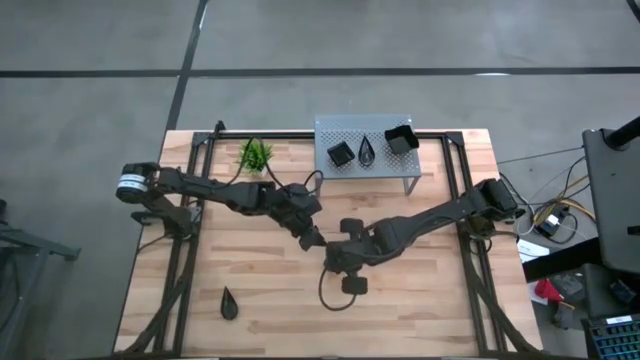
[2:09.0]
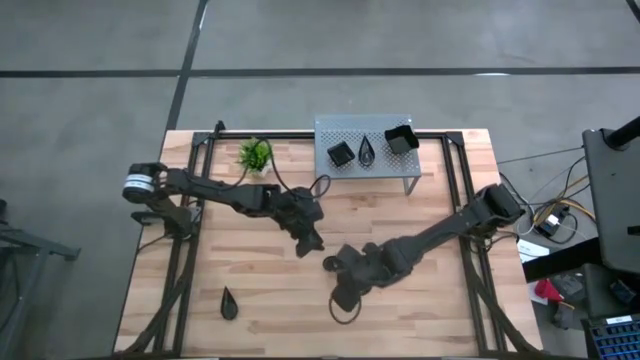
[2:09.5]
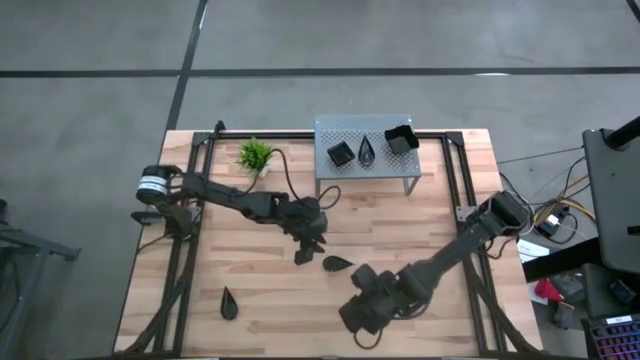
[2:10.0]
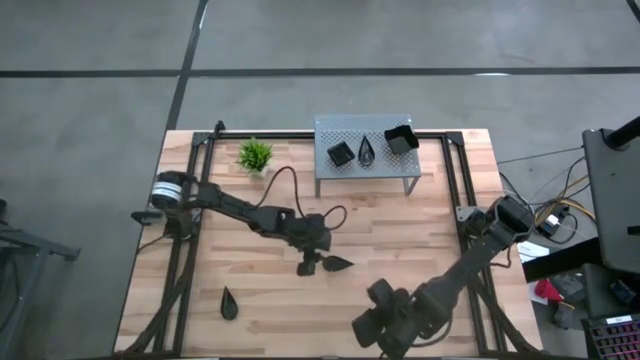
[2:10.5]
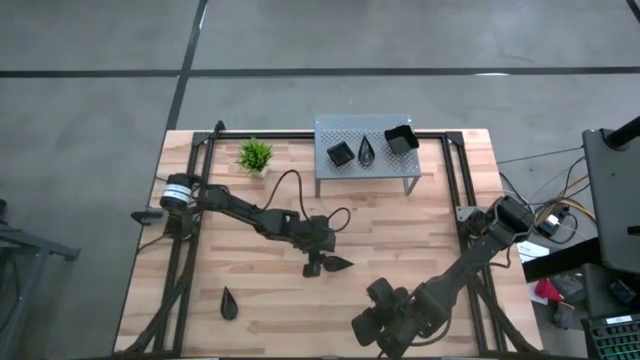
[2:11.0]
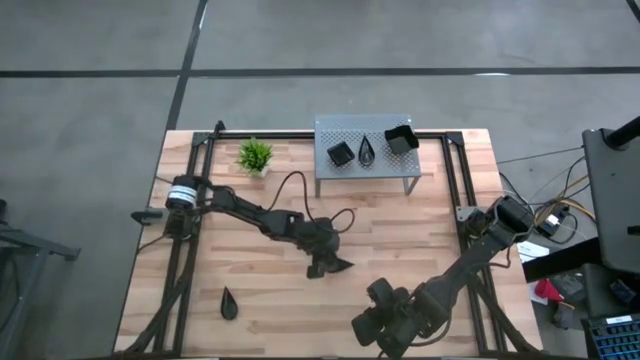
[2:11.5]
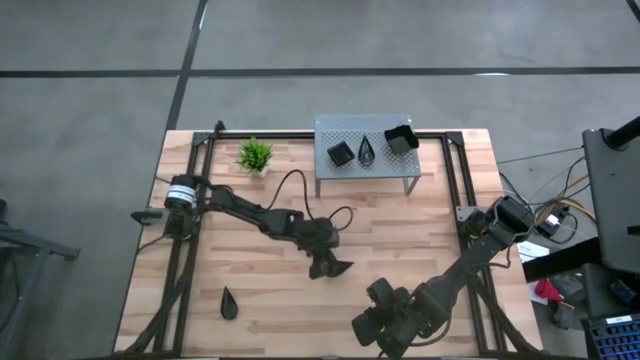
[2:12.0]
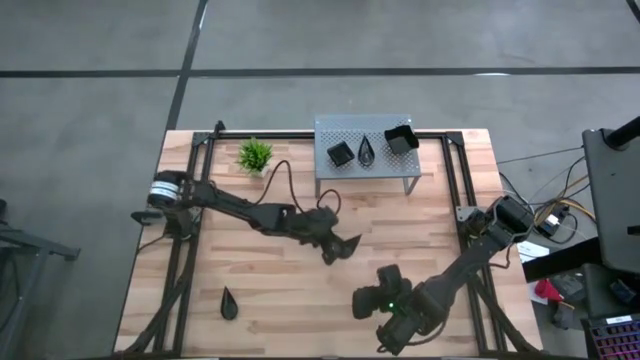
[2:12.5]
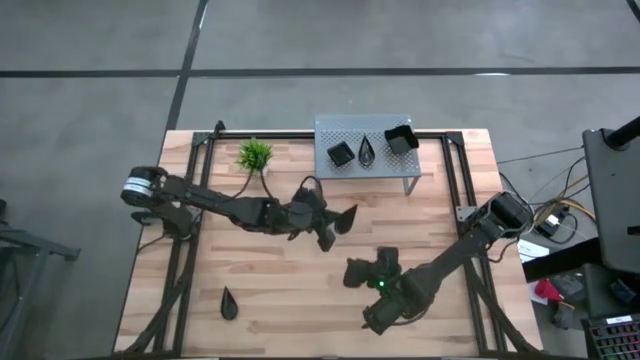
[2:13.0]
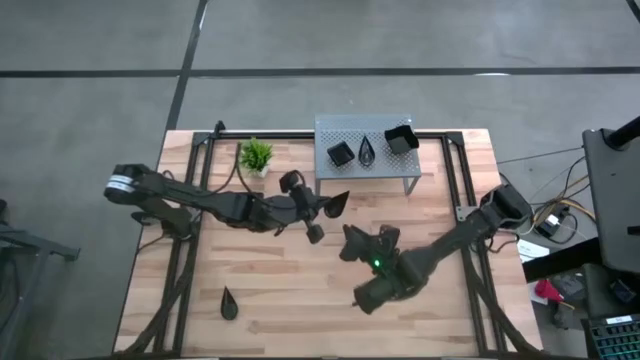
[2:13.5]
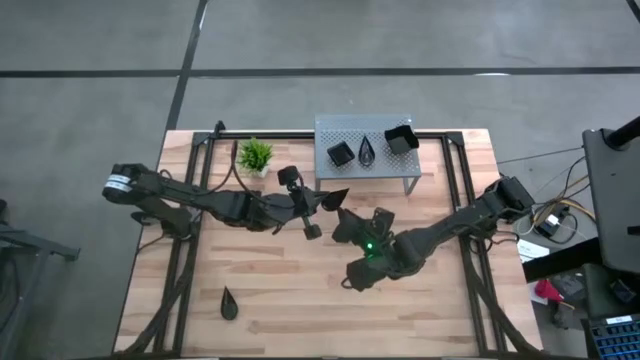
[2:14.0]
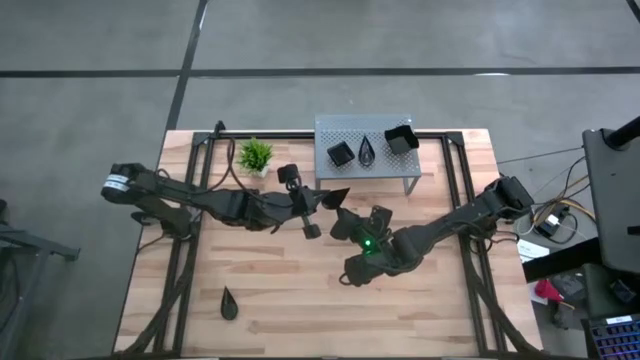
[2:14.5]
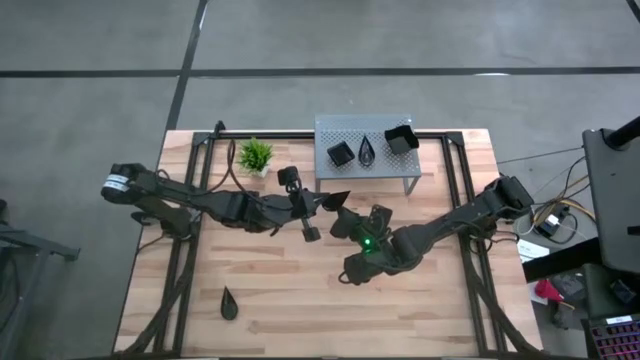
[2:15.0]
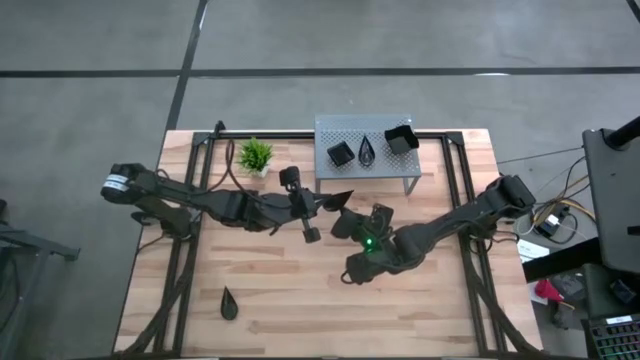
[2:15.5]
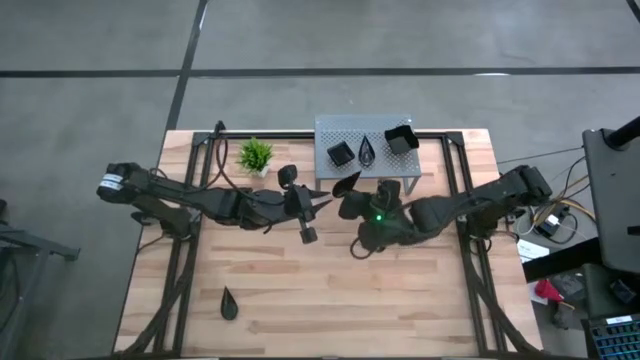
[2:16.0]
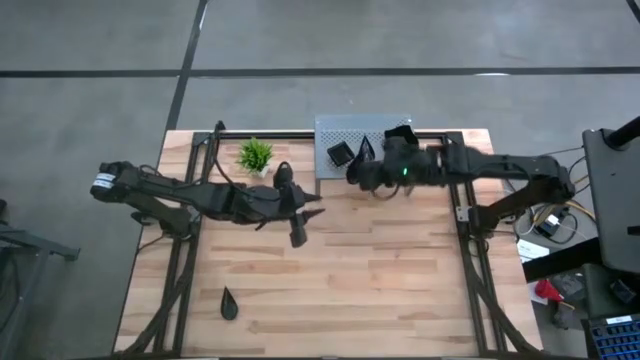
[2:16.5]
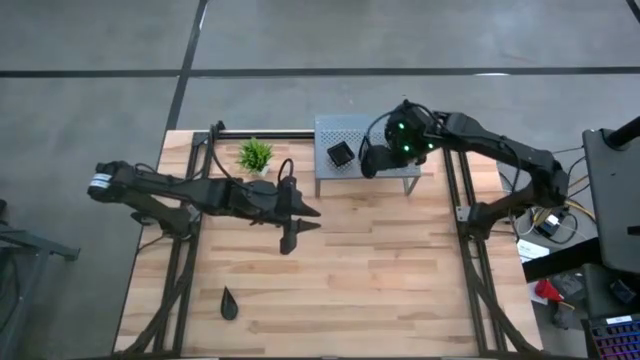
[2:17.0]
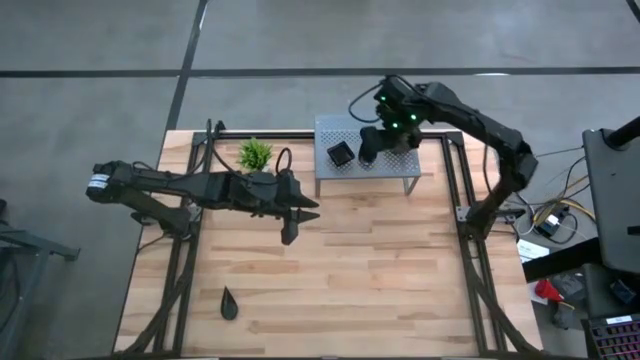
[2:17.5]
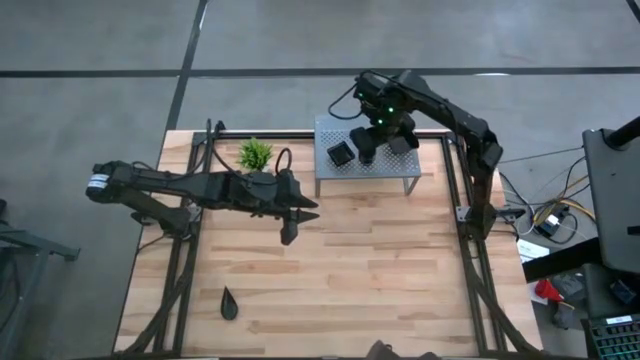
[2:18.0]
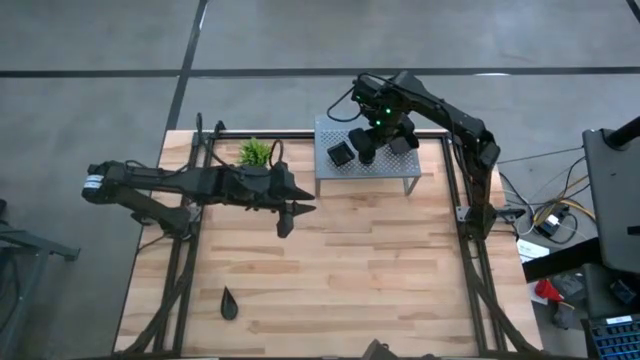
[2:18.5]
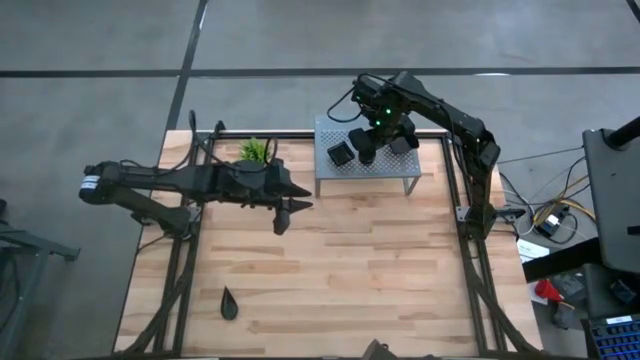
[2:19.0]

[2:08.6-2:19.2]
Task: Pick & Place Mini shaped plates
Stack the black drop-shaped plate on top of the black drop-shaped plate on the shelf

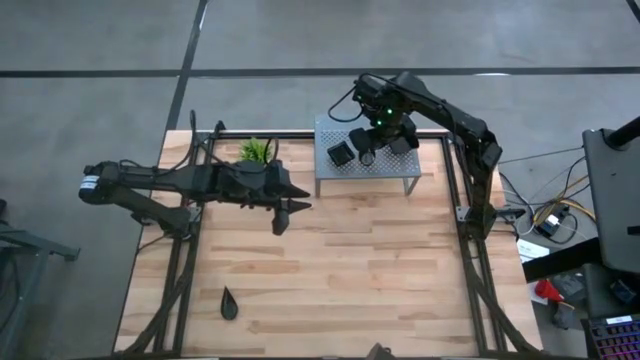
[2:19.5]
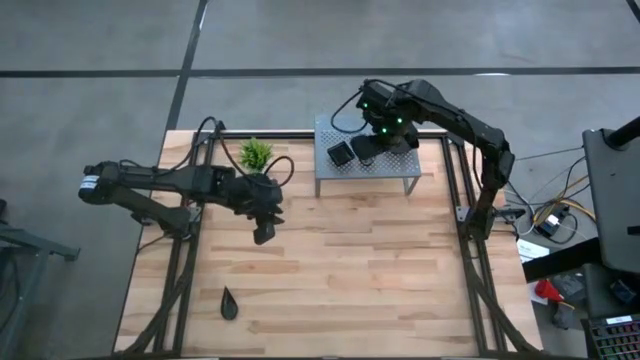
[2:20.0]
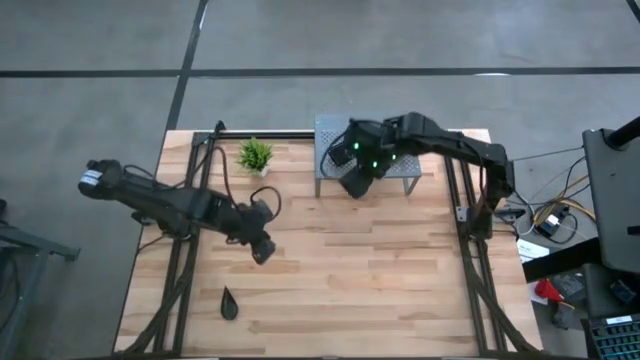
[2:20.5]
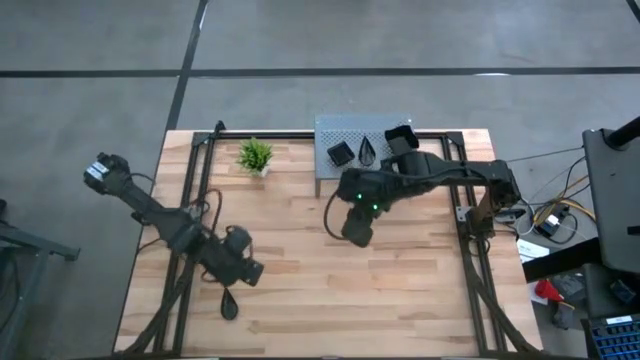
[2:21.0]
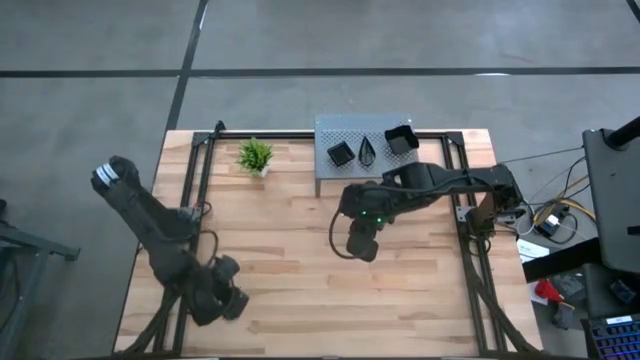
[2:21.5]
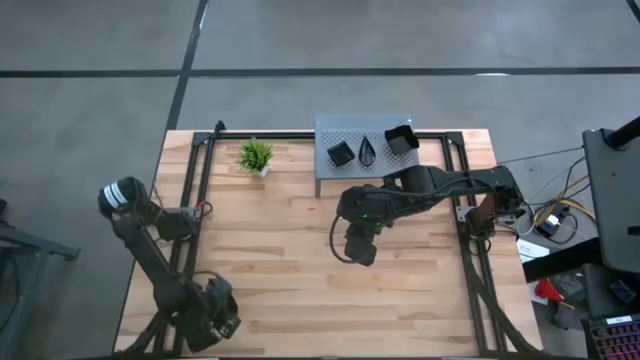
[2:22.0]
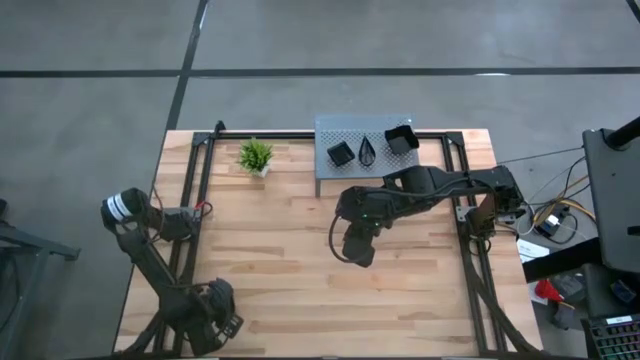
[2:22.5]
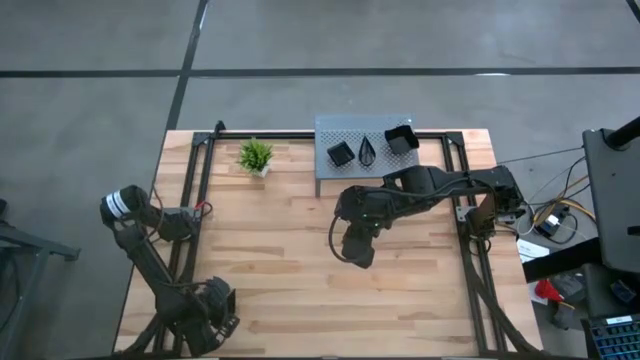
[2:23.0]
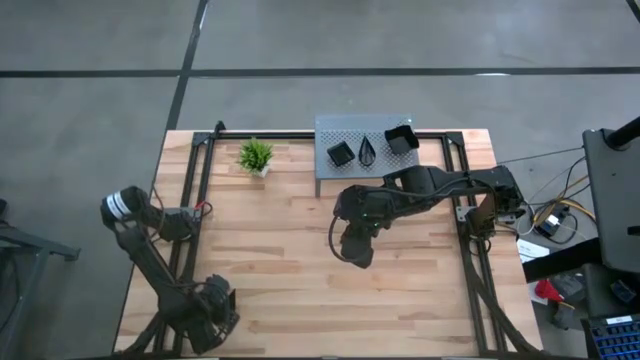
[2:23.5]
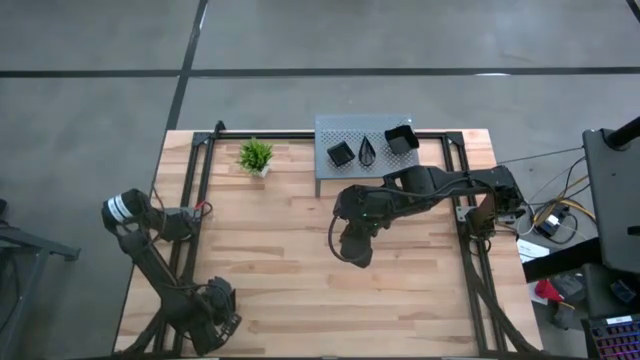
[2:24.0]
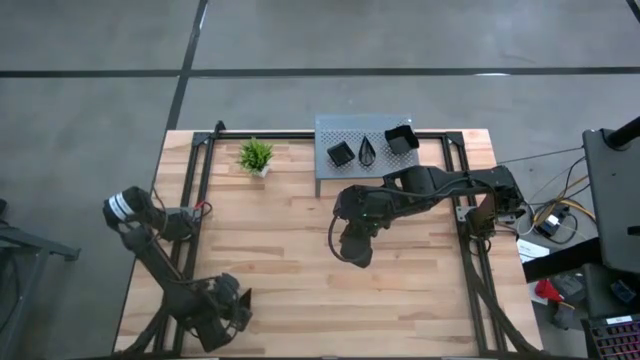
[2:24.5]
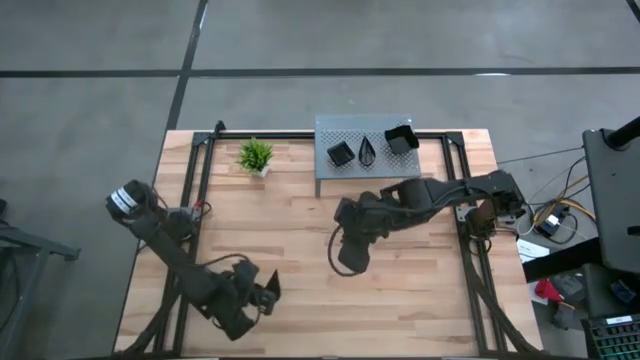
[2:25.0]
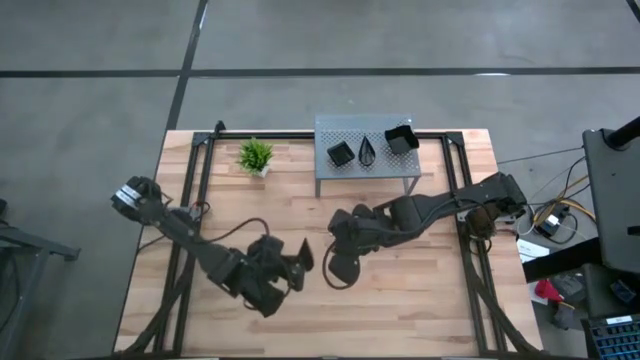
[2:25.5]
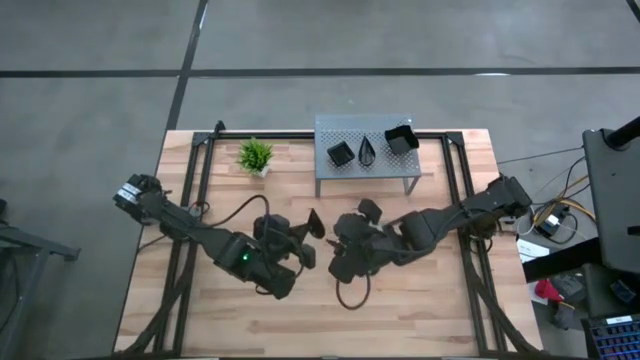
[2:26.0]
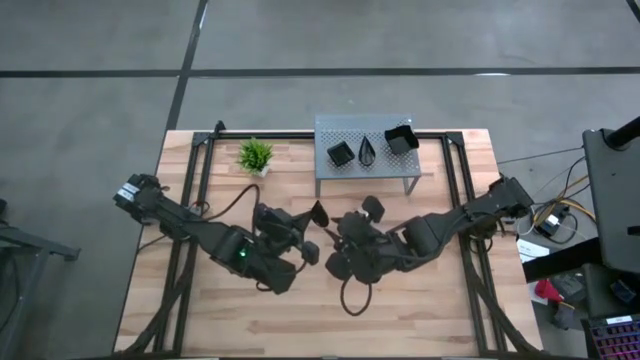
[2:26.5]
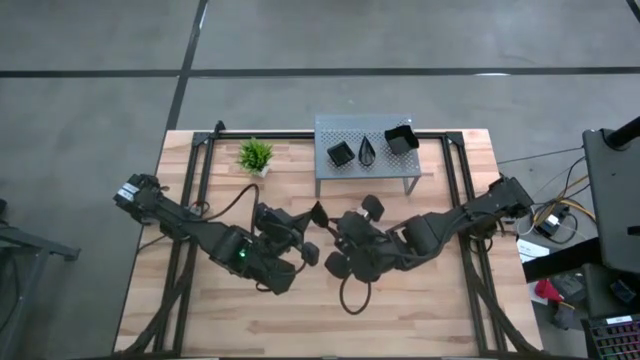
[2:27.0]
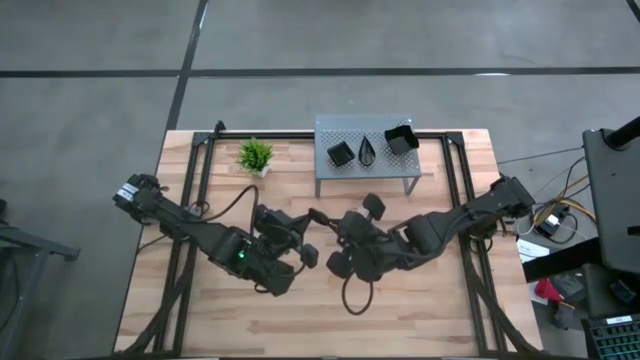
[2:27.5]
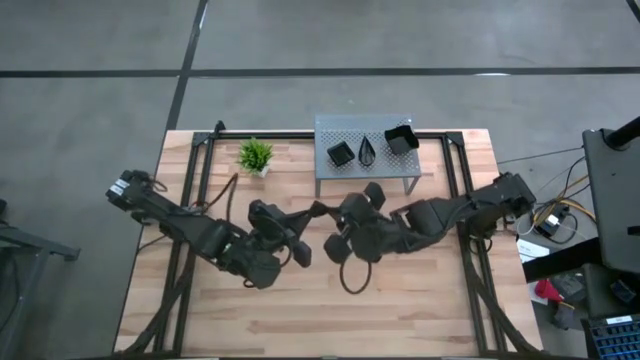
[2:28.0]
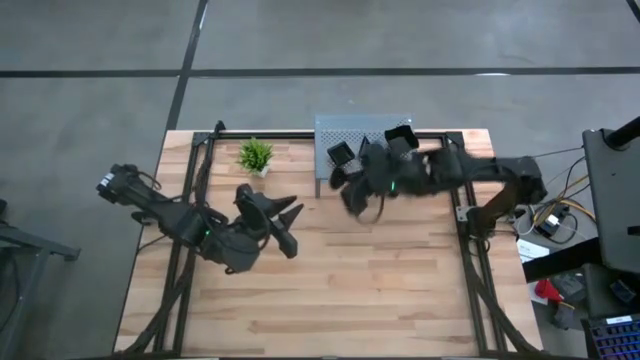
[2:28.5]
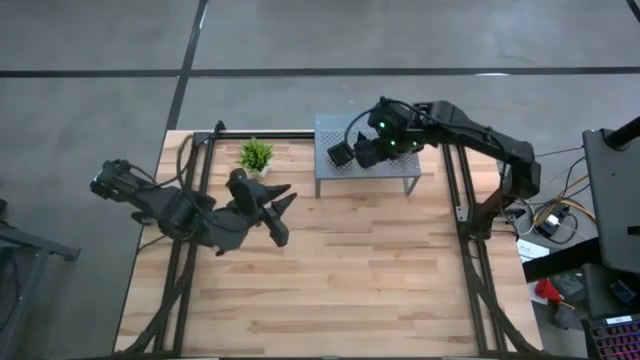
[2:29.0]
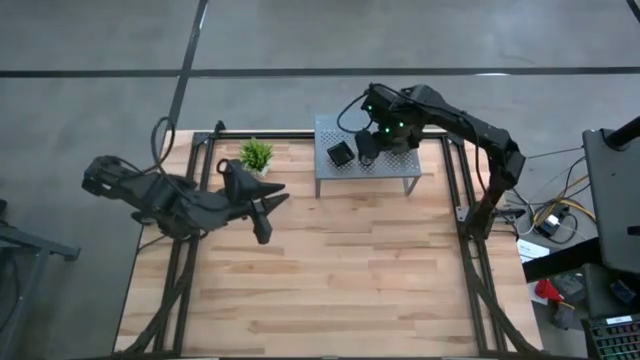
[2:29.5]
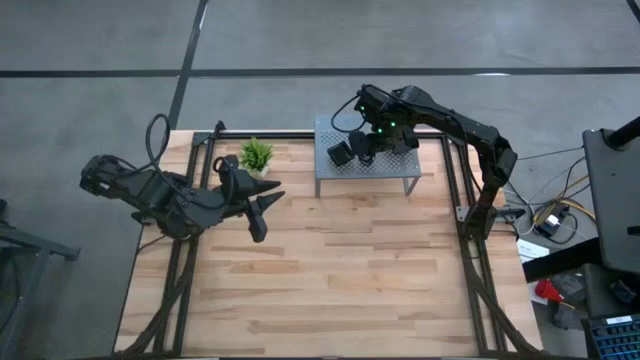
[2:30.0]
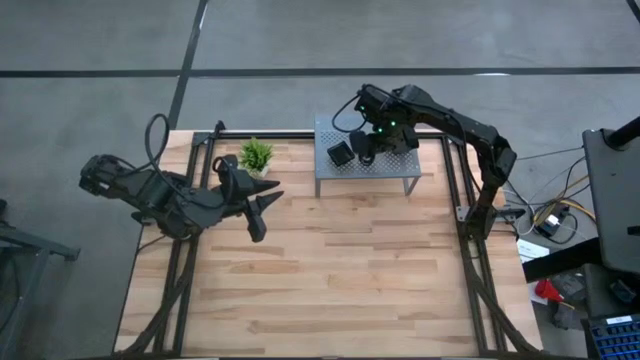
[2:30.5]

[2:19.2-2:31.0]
Stack the black drop-shaped plate on top of the black drop-shaped plate on the shelf
